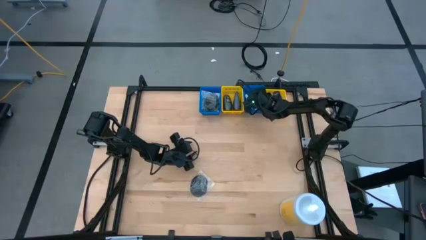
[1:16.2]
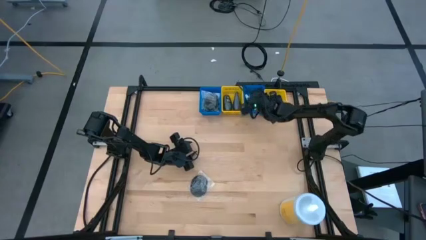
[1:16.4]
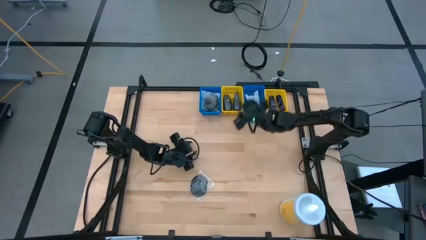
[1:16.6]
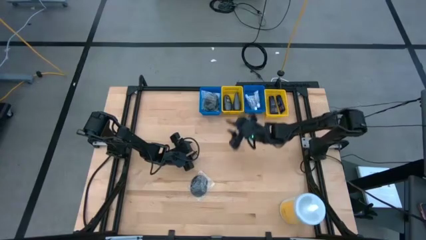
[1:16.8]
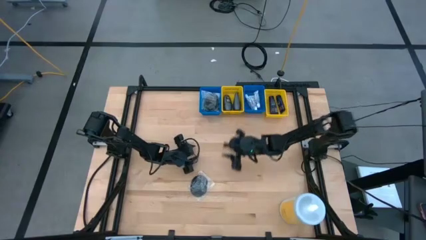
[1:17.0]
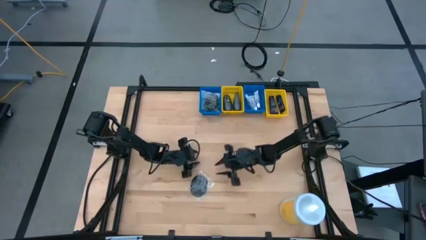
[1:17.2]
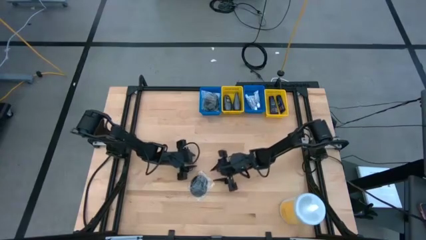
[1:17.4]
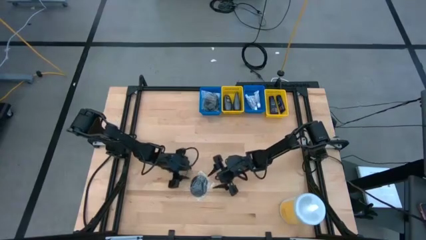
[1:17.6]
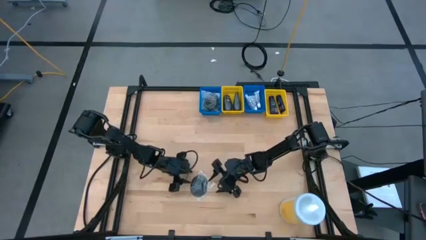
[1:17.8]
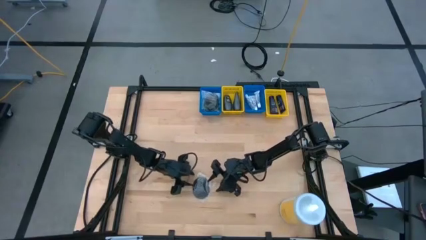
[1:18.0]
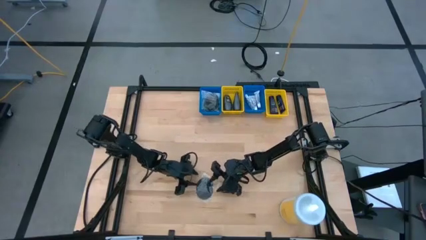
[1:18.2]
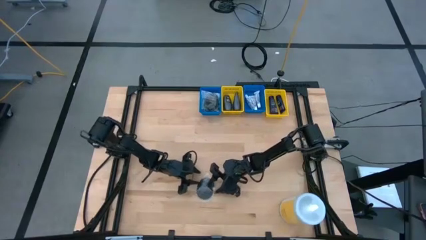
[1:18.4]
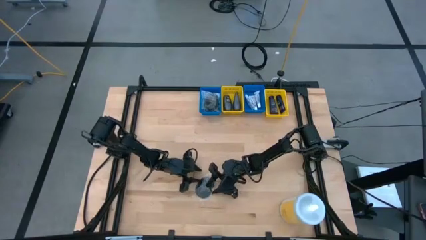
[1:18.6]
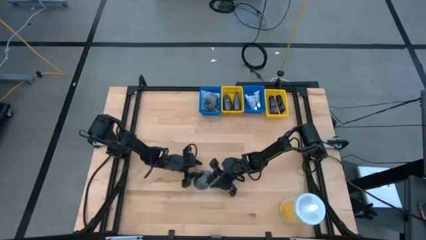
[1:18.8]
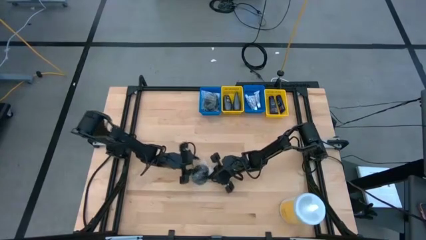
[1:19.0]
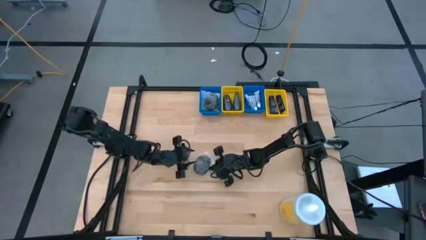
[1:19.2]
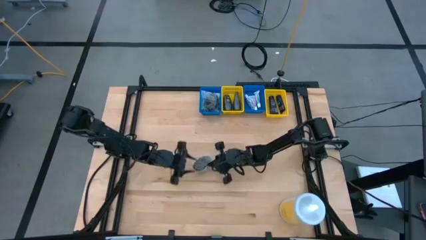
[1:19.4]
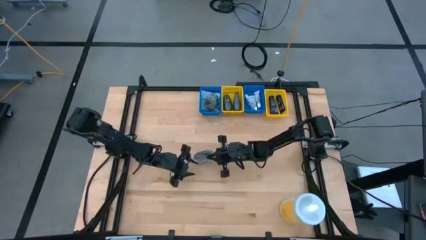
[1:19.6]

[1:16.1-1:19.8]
Task: Pick & Place Travel size toiletries
Put the black hairbrush into the left blue bin

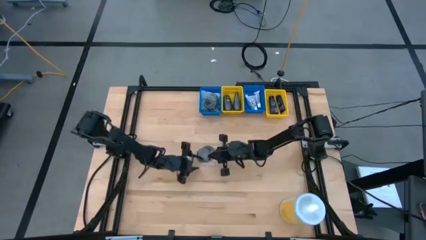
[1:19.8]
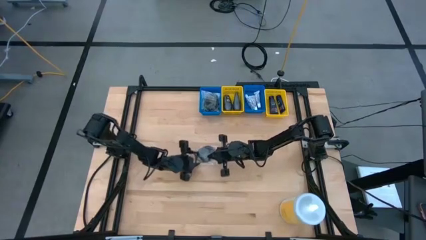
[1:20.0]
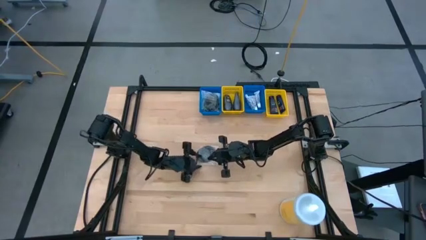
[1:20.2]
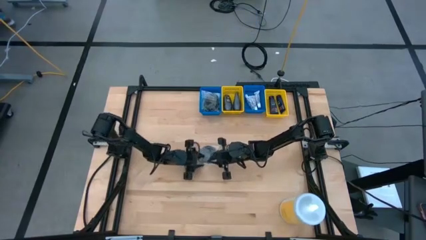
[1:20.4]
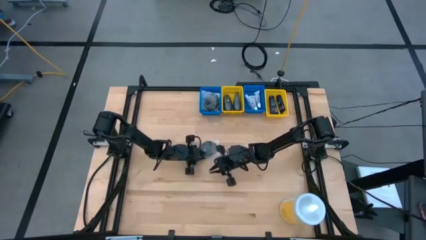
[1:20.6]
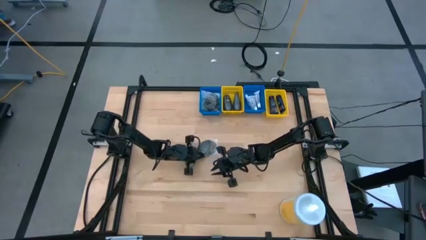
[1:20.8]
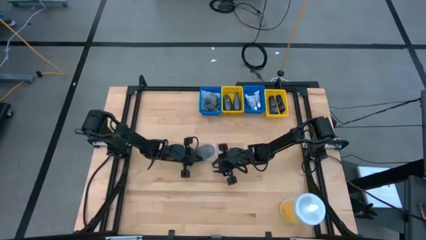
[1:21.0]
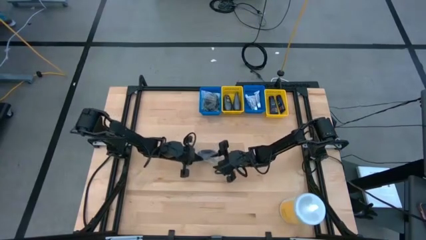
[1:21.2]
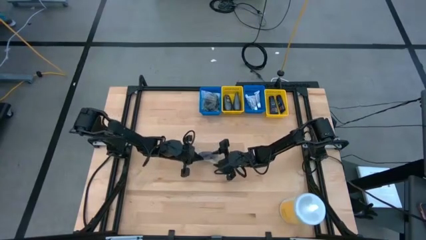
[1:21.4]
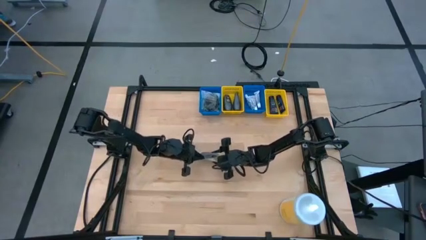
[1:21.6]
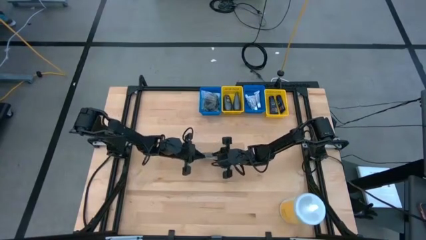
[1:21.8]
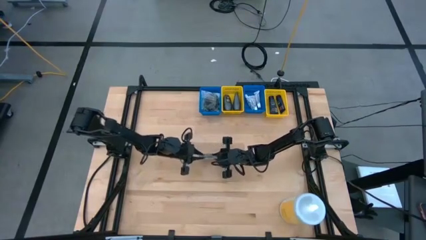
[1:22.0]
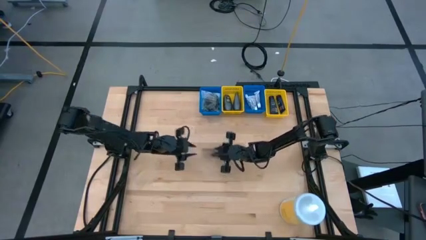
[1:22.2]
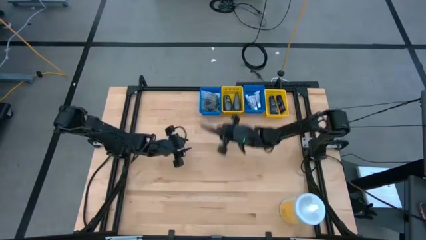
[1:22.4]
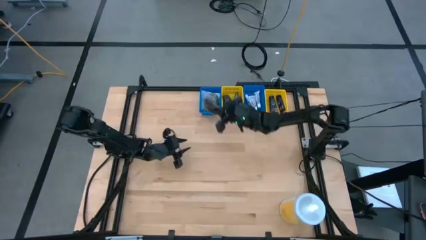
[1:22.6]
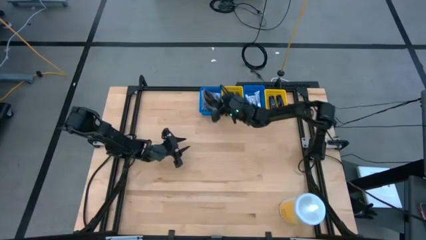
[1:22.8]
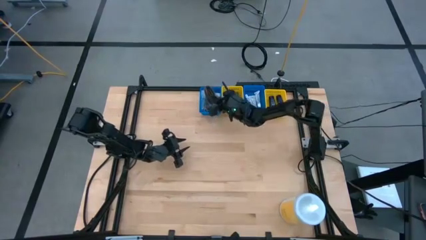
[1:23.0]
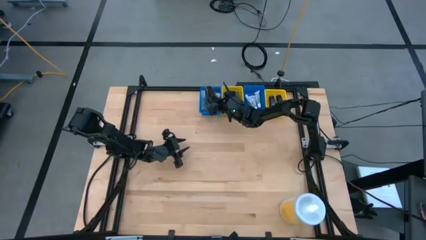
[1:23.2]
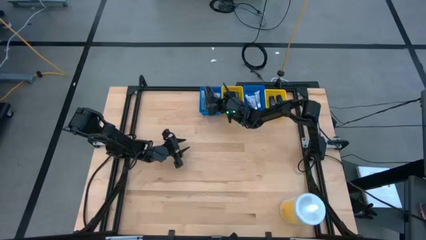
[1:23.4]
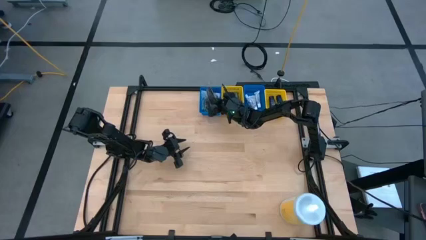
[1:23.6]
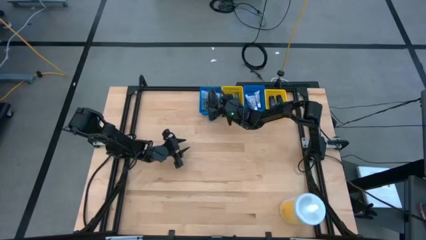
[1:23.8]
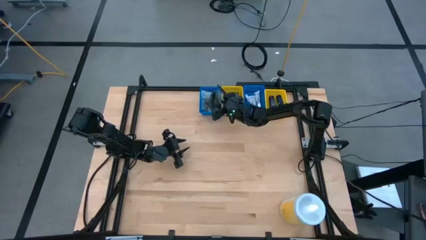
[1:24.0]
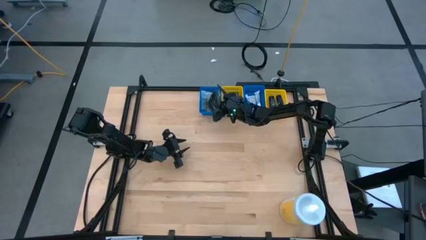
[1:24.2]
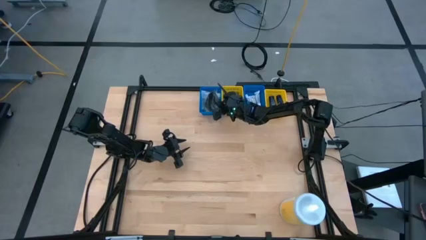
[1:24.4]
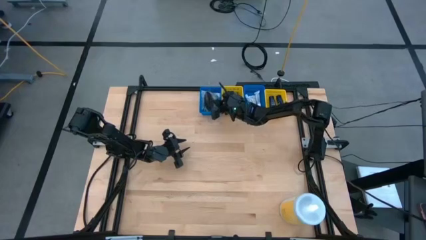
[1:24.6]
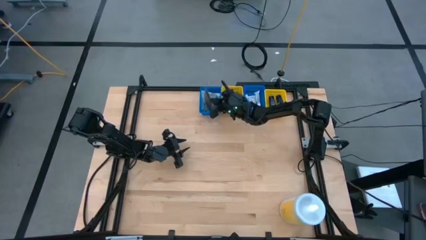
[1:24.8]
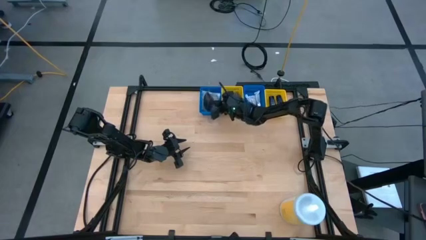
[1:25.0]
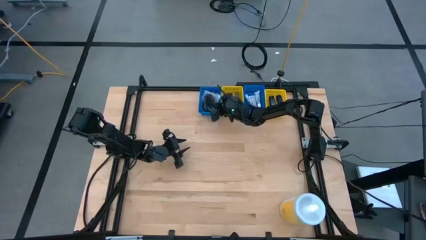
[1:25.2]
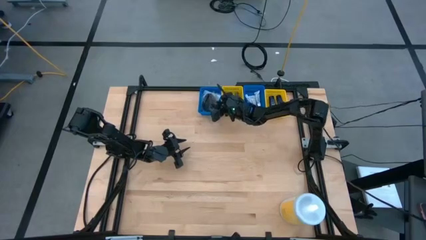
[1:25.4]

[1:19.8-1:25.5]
Put the black hairbrush into the left blue bin

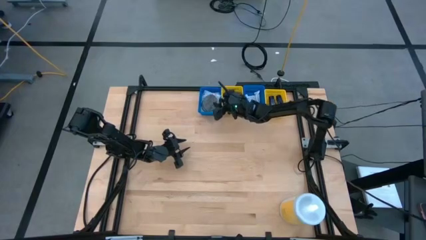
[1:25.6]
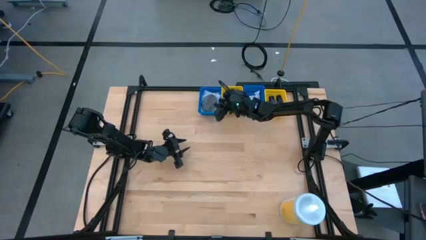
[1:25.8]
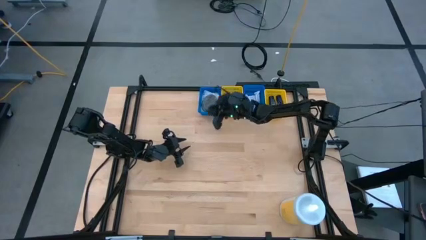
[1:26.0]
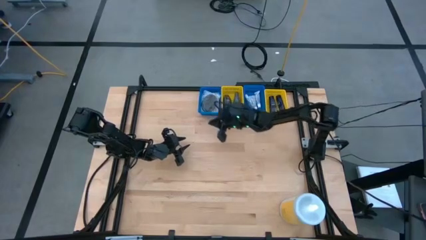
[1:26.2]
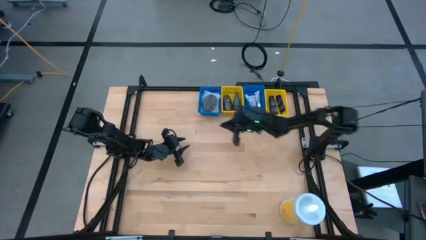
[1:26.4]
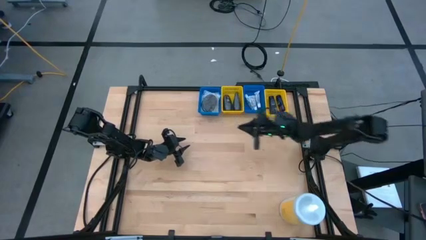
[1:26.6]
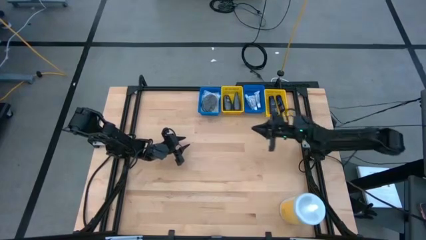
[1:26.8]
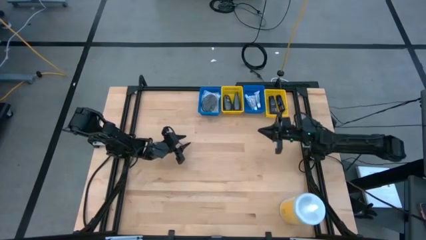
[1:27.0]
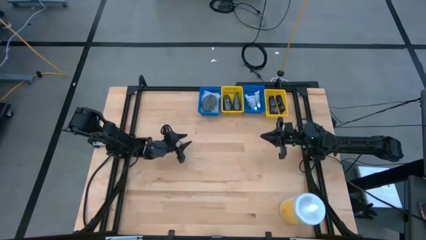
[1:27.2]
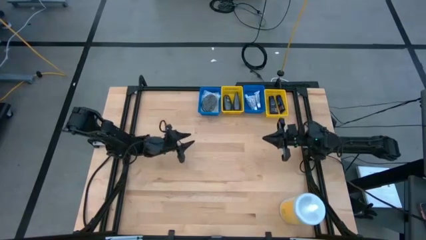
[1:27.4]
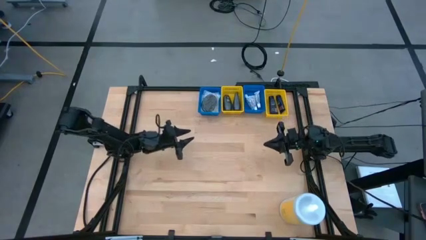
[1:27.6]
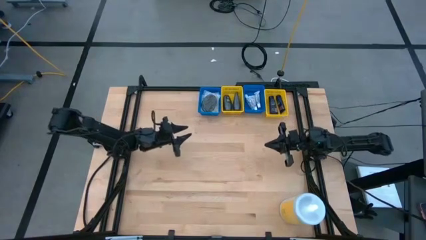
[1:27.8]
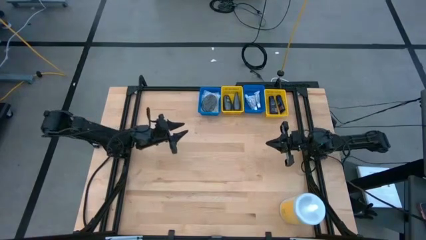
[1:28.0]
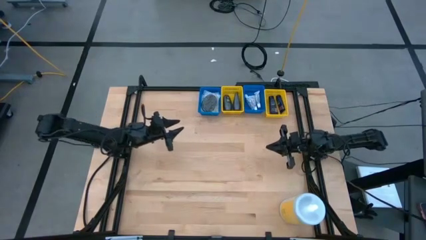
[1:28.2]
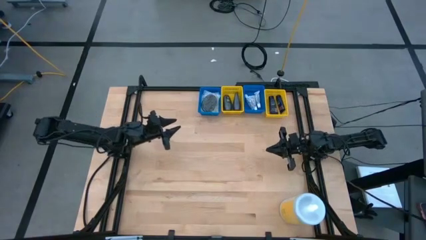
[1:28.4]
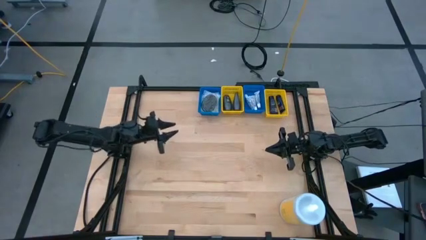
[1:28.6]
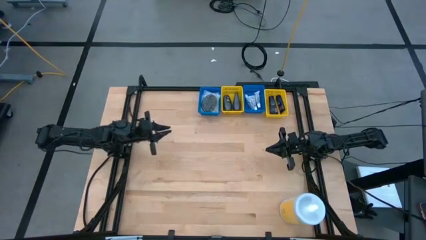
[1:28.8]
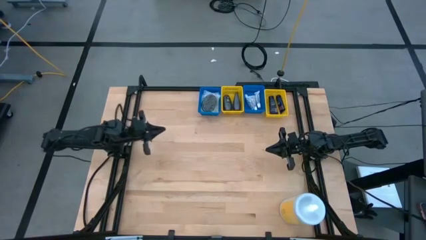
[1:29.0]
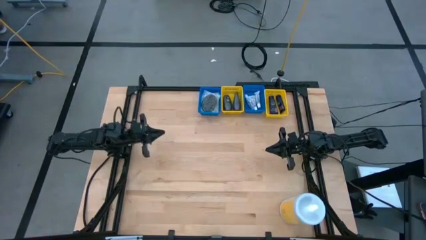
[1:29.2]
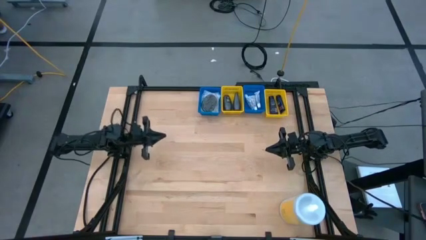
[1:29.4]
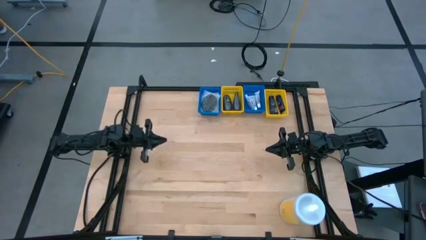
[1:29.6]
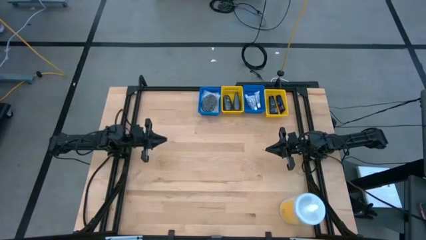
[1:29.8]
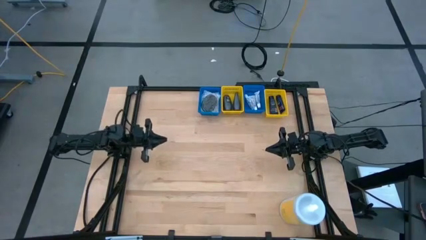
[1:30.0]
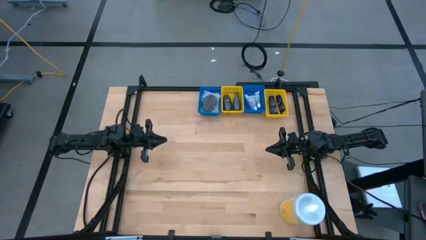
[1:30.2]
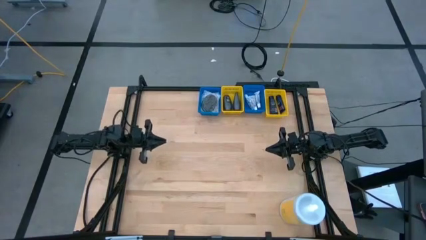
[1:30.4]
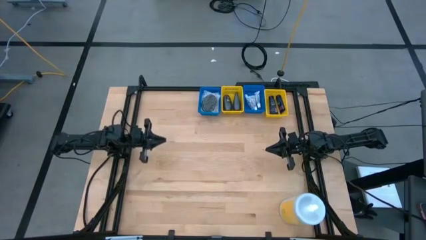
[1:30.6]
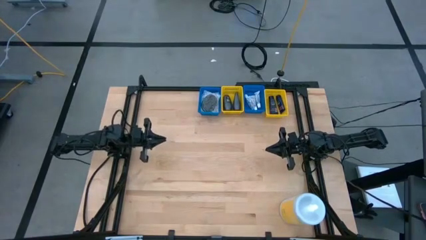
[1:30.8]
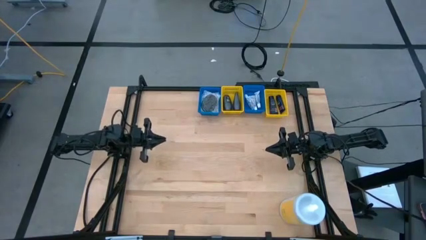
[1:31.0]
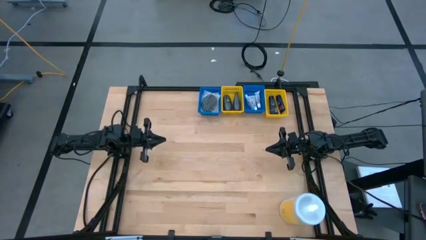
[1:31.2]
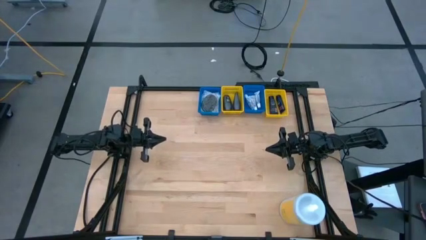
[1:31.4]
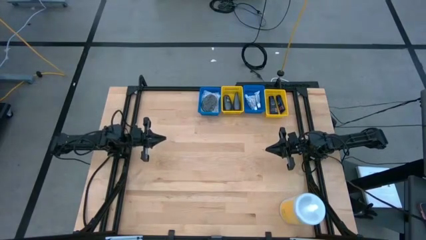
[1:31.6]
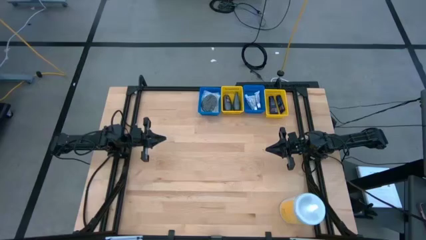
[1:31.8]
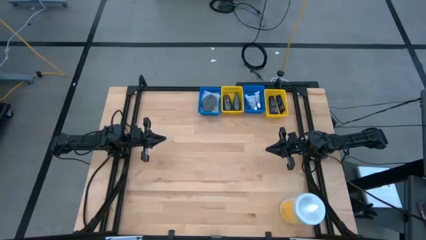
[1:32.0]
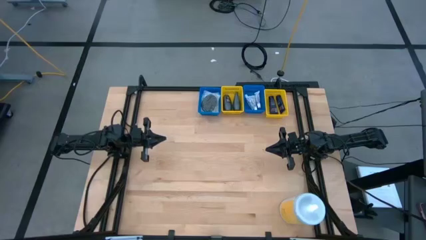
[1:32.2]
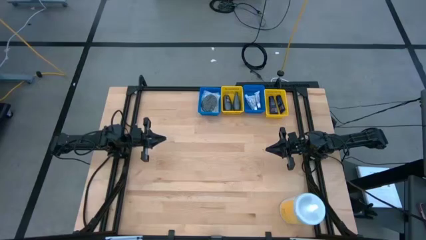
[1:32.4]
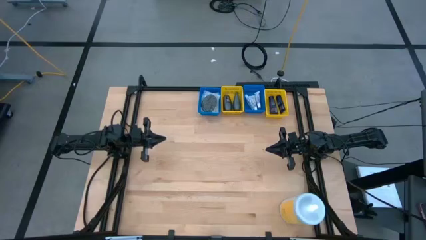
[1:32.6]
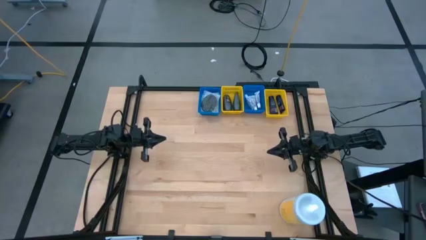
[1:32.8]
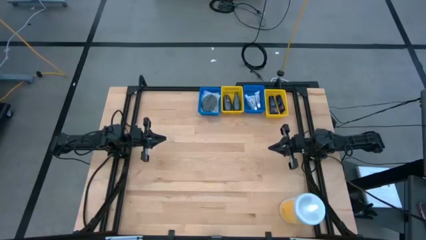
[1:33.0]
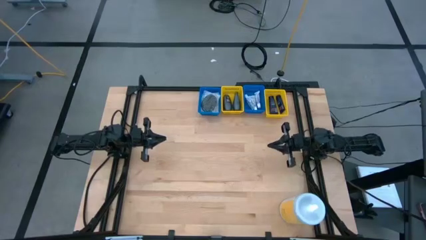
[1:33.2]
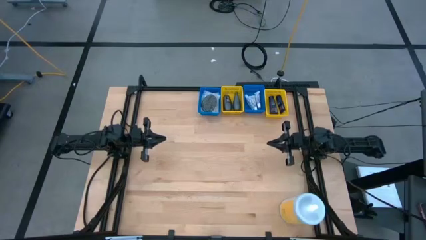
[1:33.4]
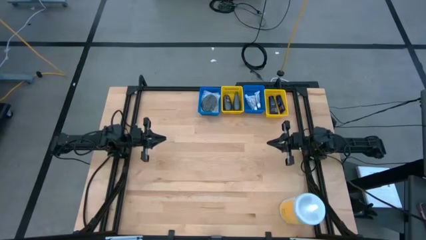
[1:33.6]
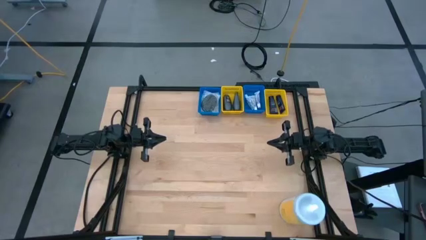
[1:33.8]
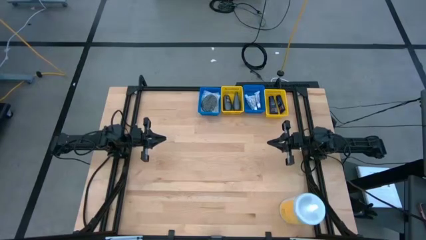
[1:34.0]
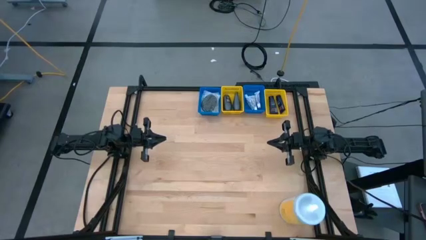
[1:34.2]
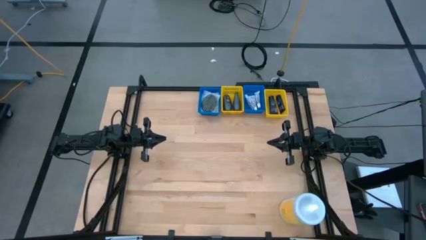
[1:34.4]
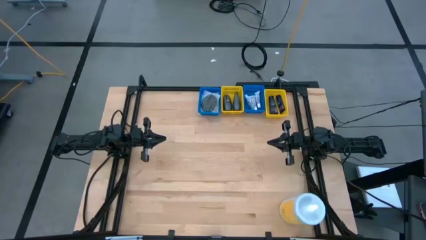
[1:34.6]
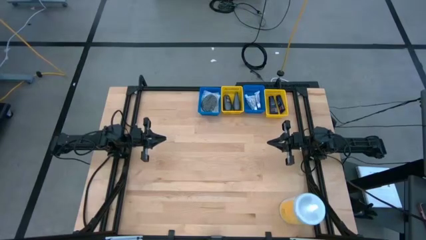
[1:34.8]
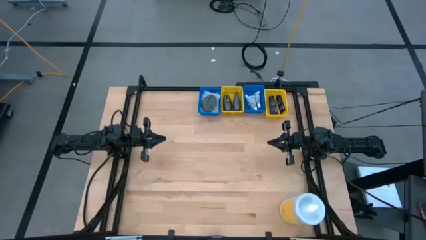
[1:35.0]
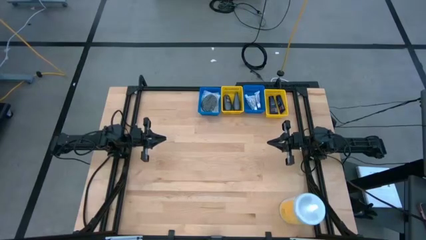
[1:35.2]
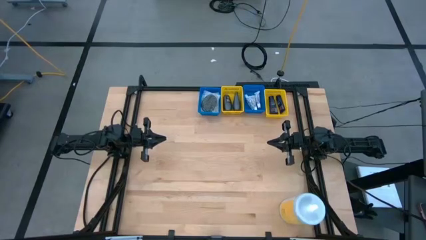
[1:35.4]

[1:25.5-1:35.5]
Return to Home Position
